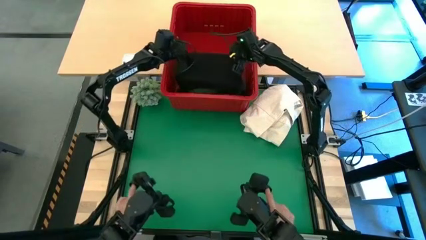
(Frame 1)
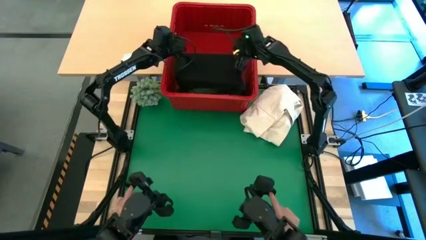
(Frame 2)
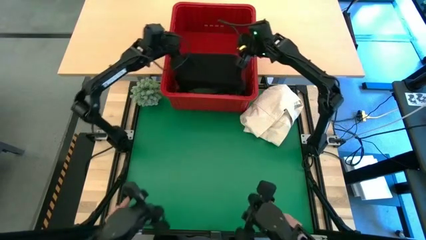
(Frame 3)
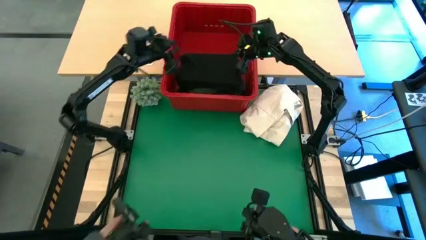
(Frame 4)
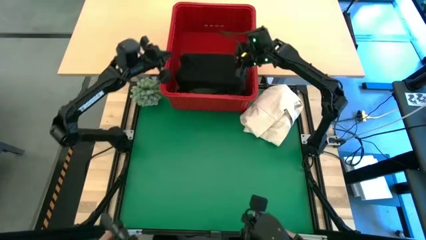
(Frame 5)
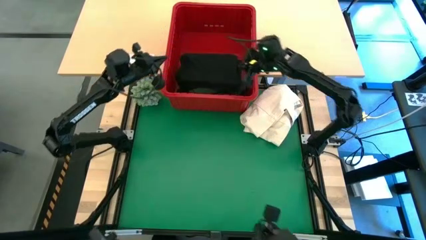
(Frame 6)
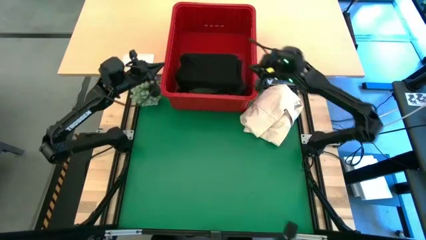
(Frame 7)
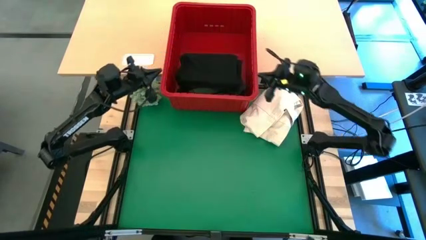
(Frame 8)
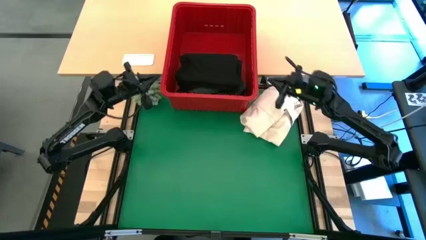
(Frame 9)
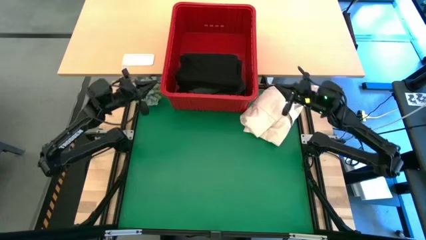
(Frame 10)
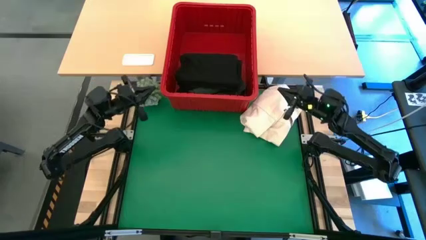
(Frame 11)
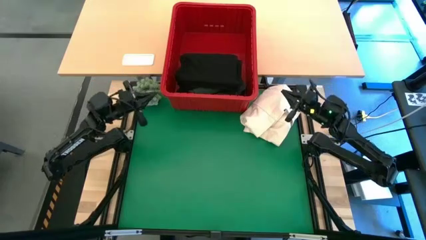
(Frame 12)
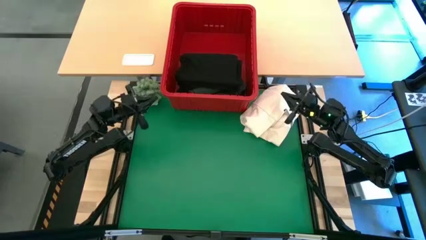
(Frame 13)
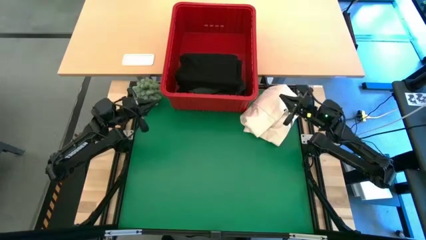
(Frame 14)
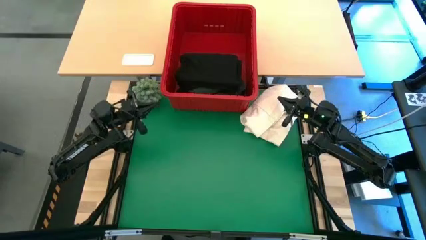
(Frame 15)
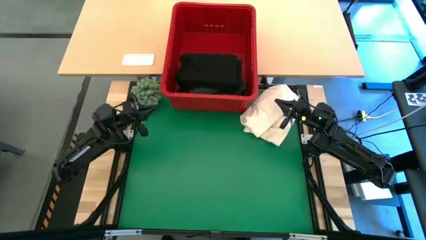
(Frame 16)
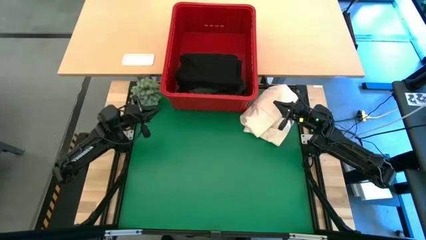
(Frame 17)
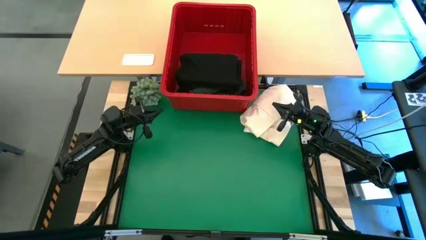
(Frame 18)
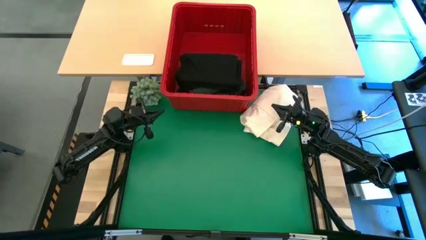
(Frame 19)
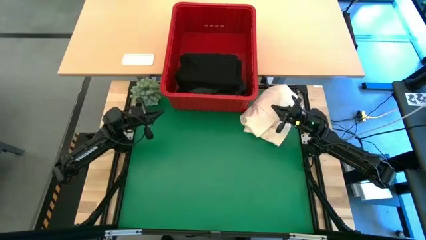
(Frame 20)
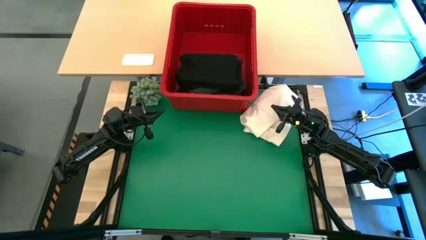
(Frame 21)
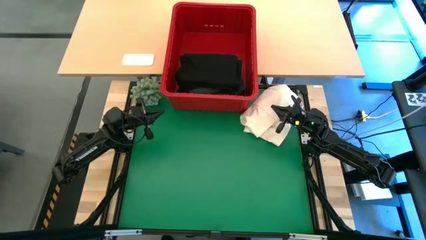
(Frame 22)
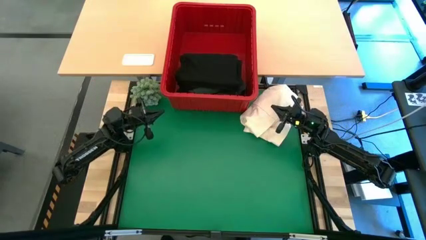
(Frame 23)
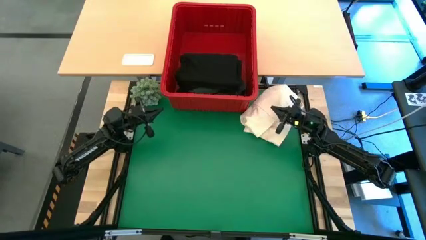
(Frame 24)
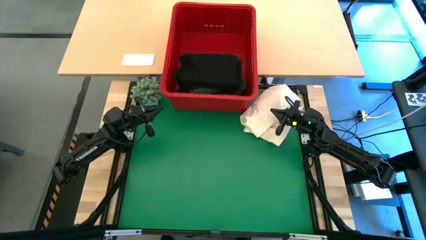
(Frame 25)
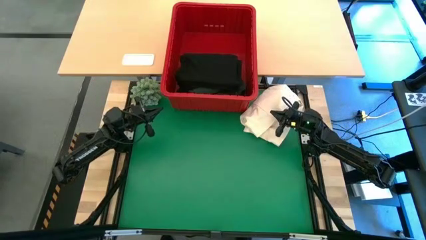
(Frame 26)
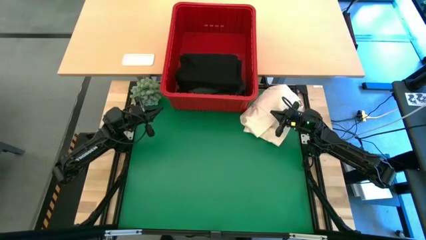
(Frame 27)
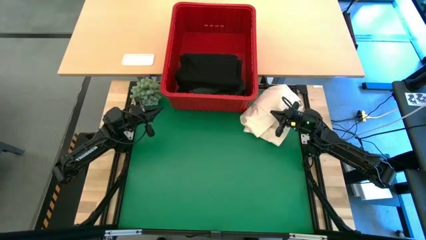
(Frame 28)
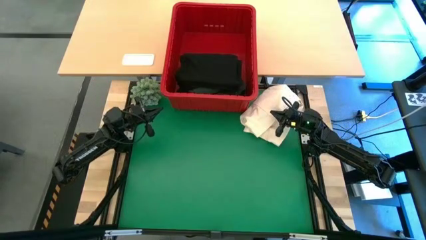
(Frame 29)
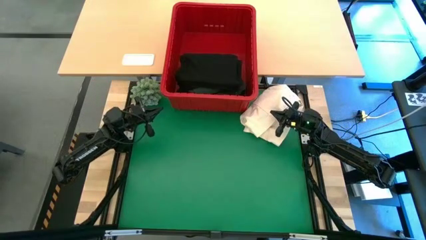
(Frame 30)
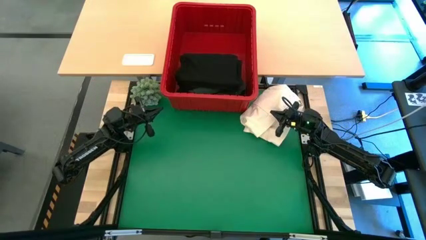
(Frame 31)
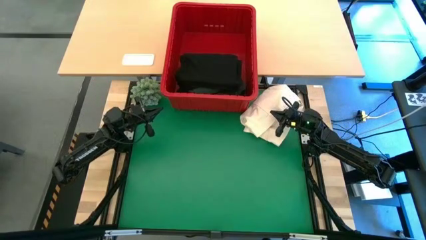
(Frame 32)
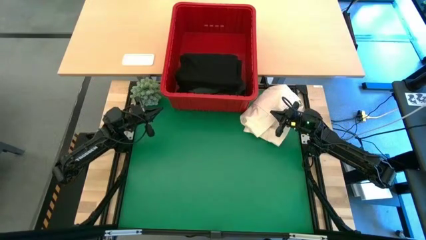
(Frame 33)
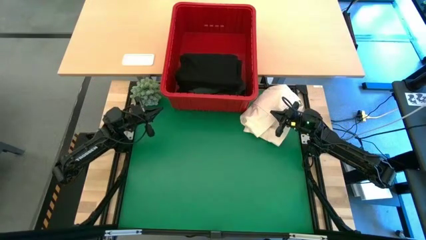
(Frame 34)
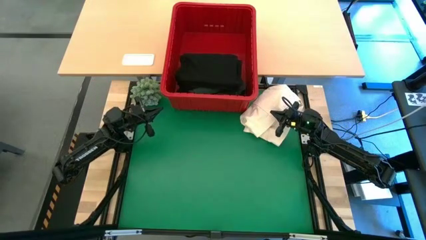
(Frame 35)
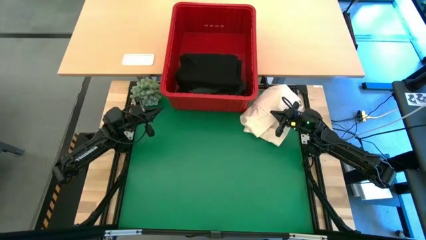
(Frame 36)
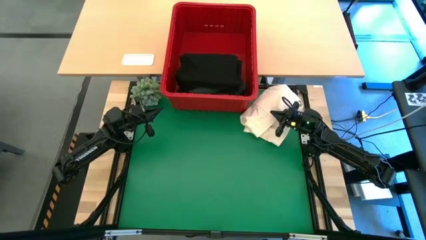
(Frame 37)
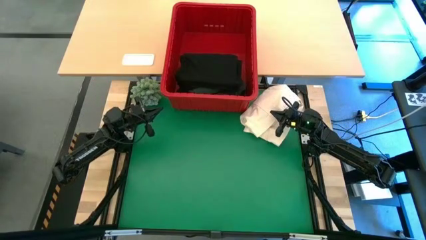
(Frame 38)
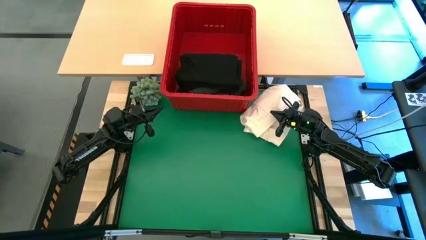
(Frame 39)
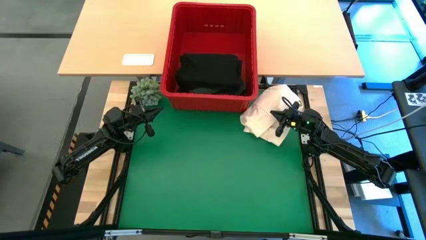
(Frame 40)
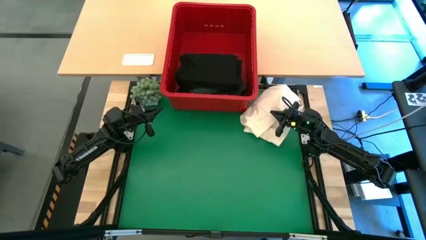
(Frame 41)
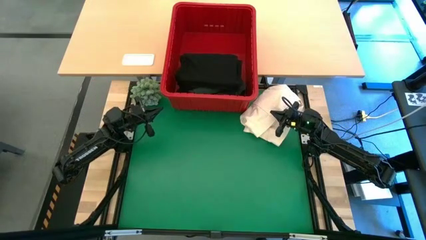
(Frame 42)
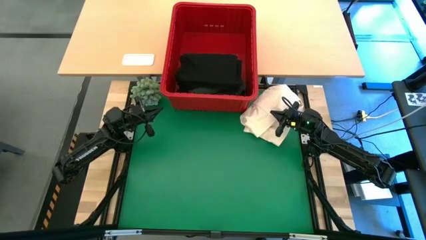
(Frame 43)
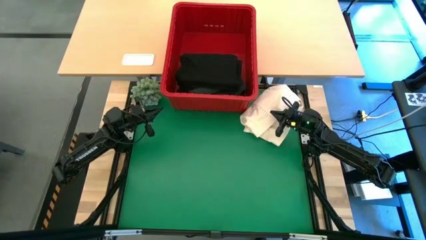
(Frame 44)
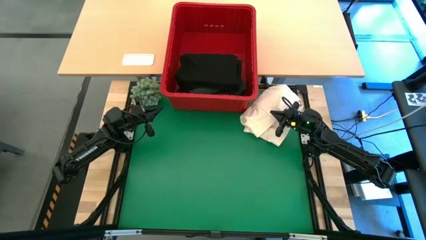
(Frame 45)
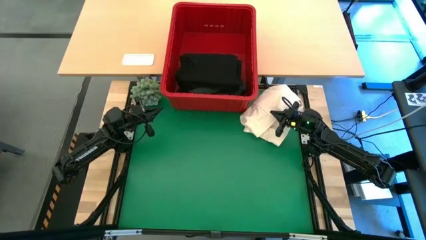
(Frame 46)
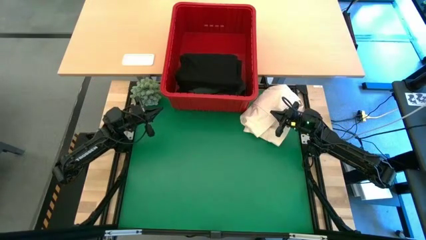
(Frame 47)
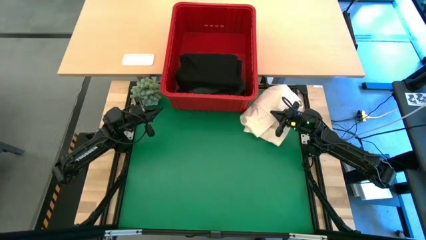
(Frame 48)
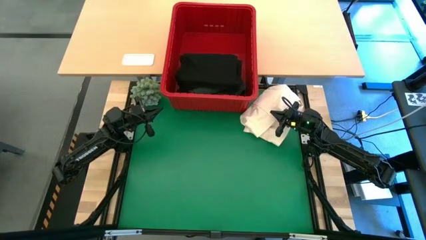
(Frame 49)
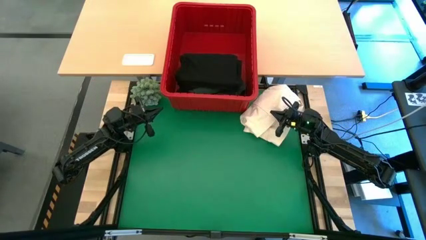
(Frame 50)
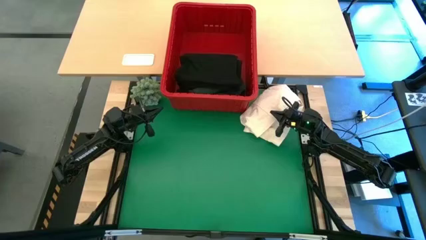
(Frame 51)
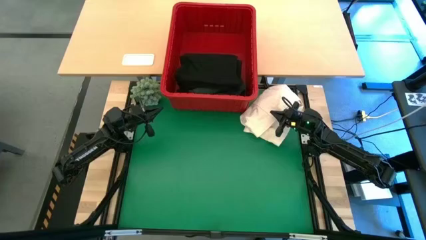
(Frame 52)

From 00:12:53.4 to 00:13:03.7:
Task: Fold laundry
Return to Home Position

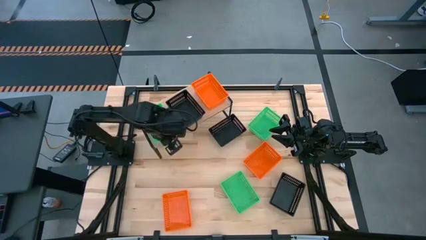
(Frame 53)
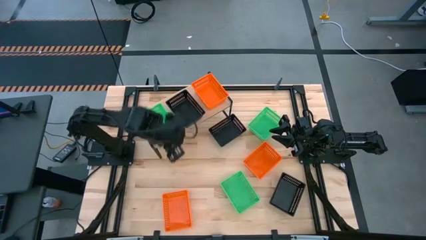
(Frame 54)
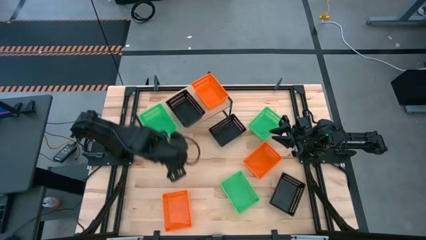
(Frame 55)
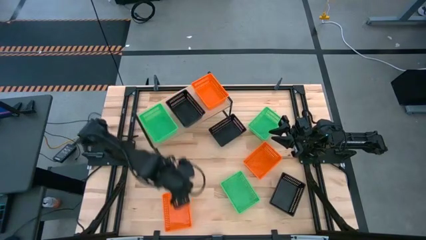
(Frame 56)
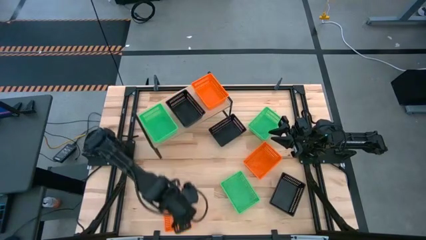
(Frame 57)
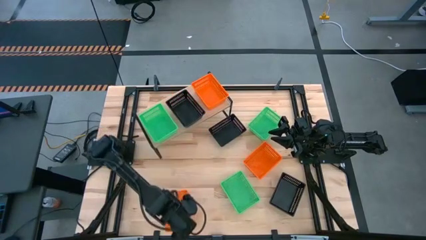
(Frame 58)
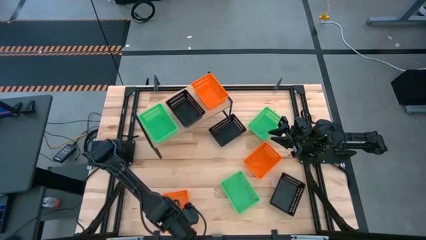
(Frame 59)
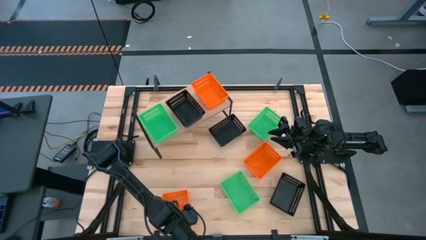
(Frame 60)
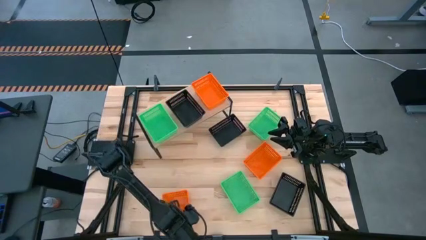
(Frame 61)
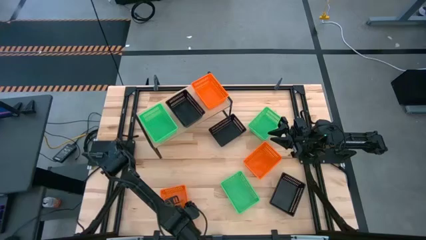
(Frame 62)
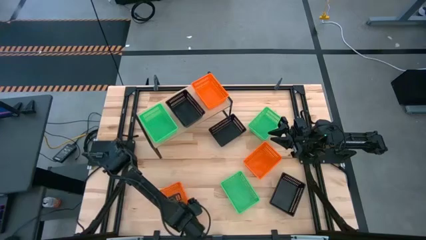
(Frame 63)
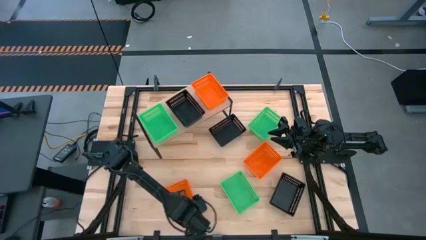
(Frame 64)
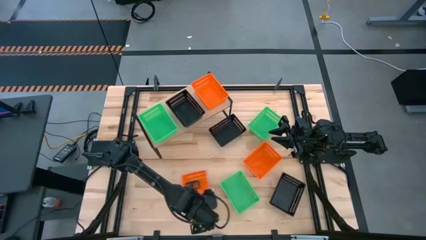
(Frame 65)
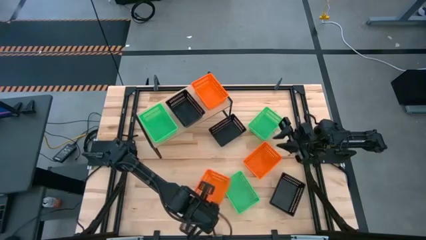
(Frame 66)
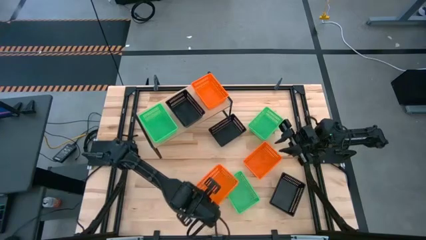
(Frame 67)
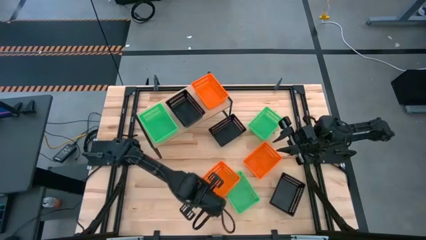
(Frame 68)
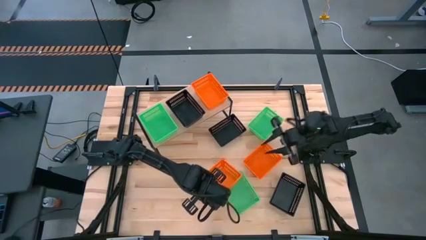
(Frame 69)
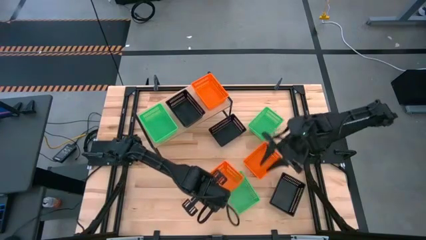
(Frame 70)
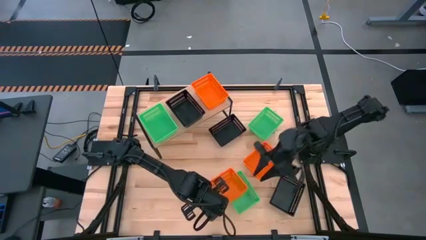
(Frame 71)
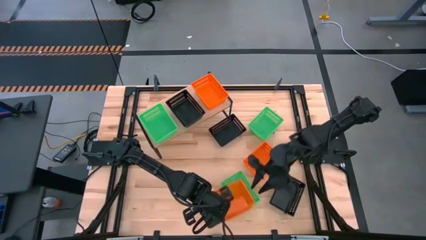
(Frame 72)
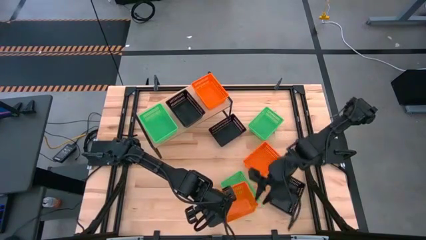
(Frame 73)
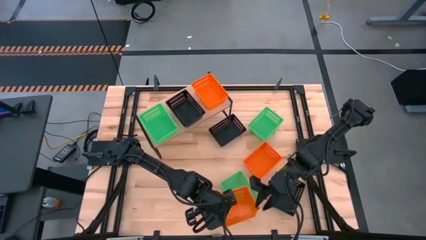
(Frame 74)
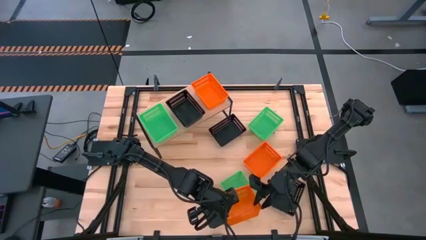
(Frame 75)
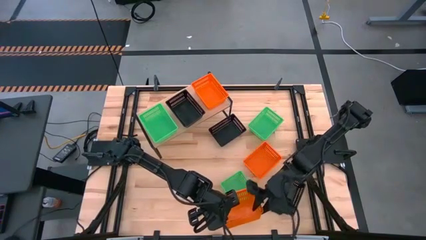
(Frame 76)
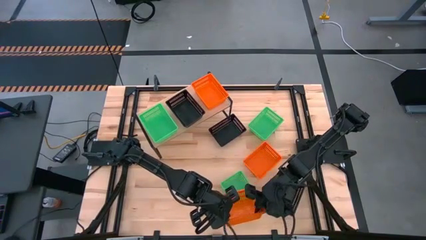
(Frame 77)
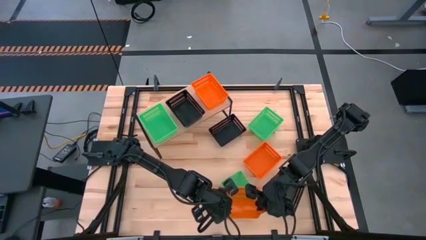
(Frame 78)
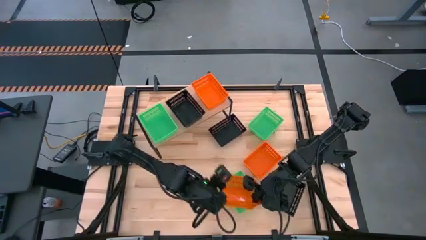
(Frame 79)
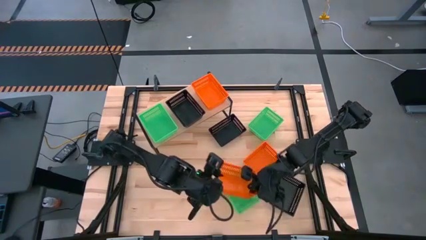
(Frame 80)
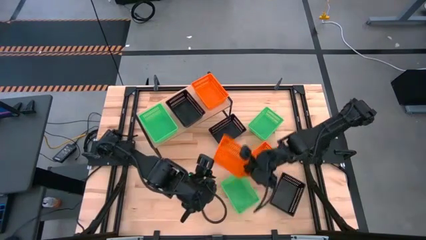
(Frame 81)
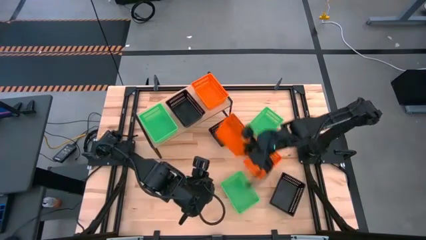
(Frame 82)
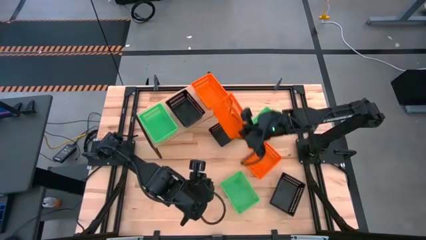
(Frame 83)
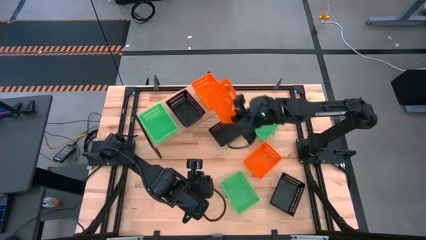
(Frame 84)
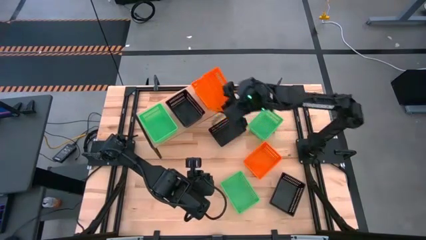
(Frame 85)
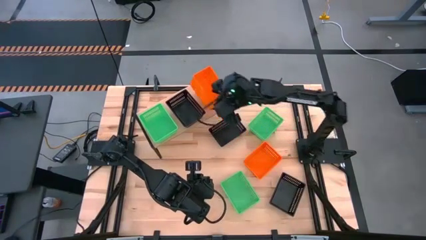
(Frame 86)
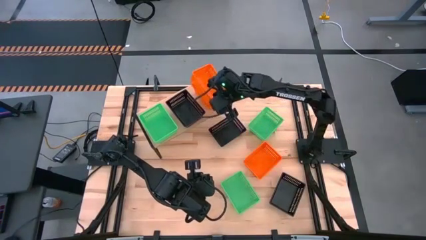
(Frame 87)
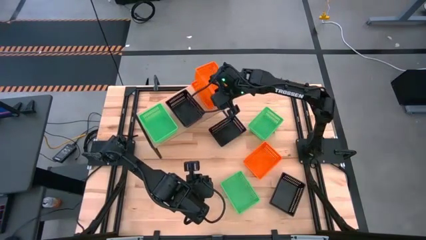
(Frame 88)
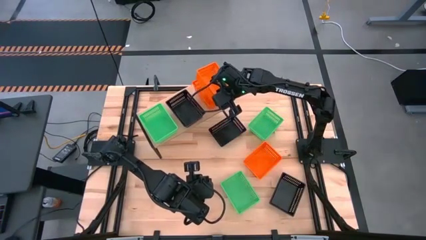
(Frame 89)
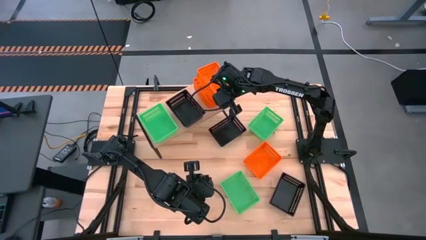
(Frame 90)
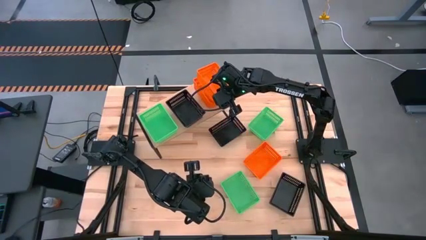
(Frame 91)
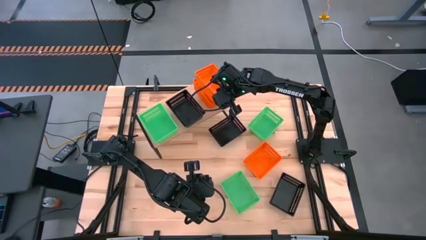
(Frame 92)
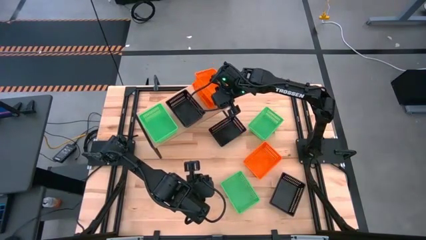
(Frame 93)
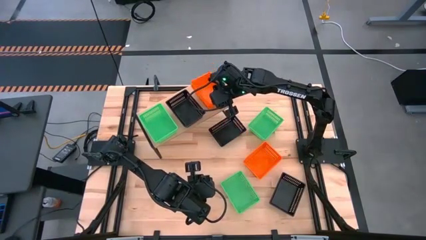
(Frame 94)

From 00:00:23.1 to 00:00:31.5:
Task: Stack baskets on shelf by color
Stack the bottom orange basket on the orange basket on the shelf
